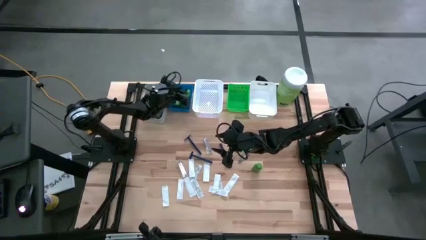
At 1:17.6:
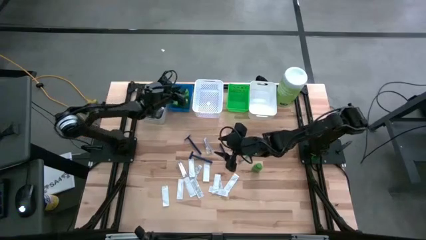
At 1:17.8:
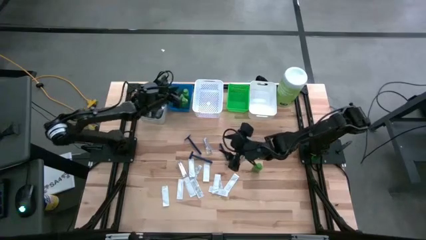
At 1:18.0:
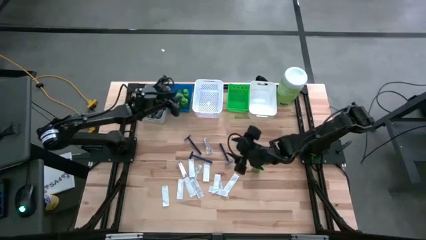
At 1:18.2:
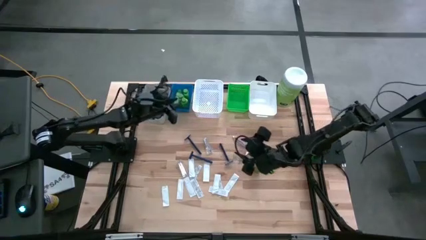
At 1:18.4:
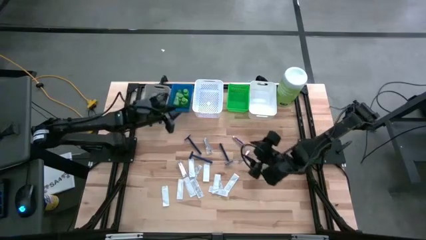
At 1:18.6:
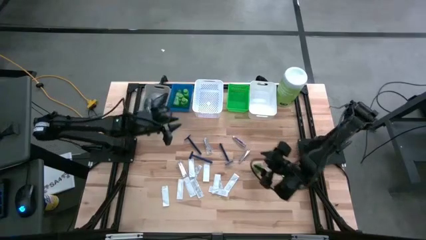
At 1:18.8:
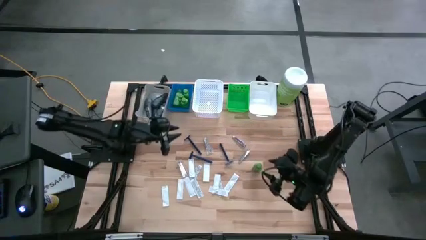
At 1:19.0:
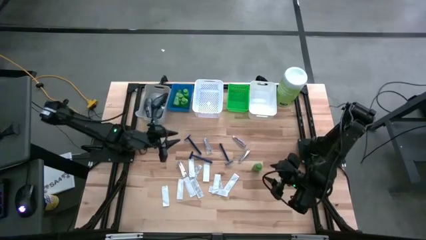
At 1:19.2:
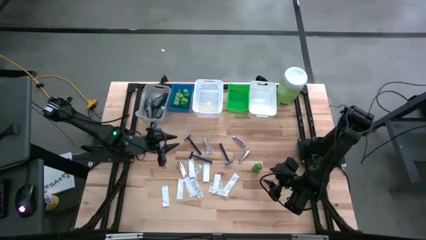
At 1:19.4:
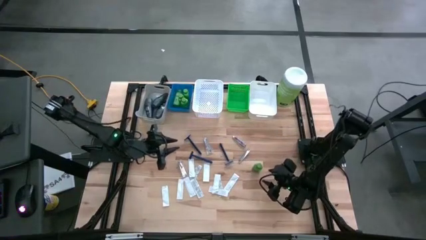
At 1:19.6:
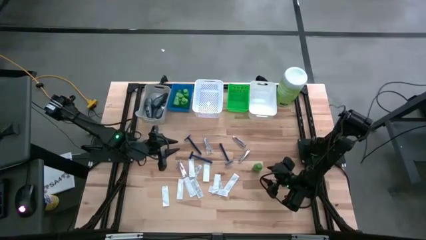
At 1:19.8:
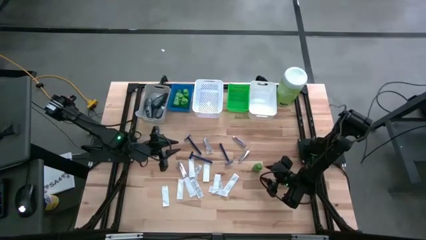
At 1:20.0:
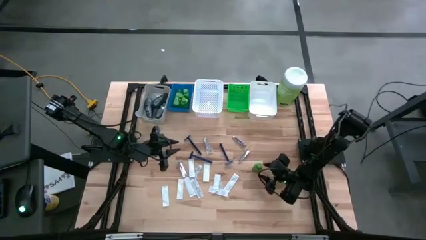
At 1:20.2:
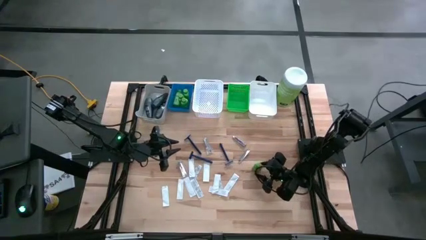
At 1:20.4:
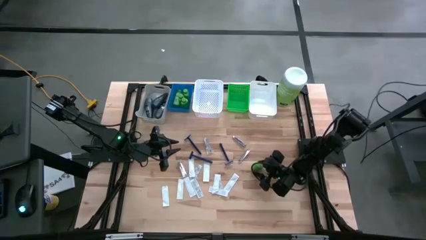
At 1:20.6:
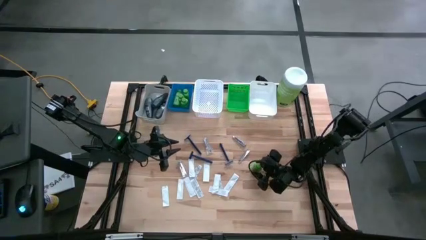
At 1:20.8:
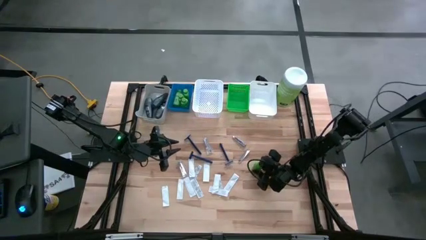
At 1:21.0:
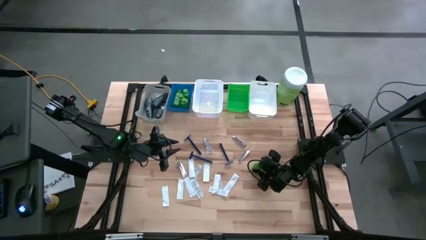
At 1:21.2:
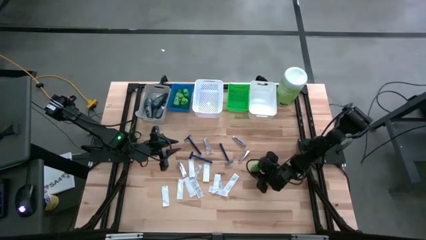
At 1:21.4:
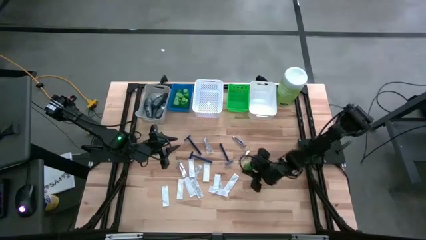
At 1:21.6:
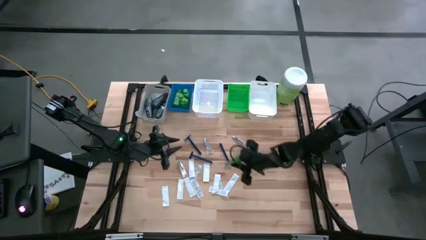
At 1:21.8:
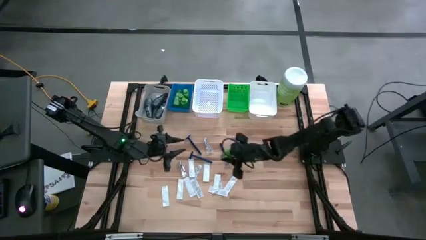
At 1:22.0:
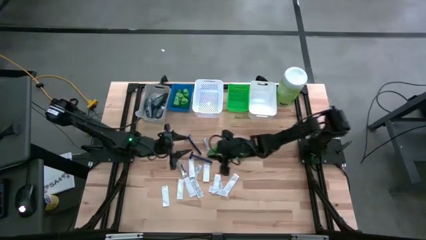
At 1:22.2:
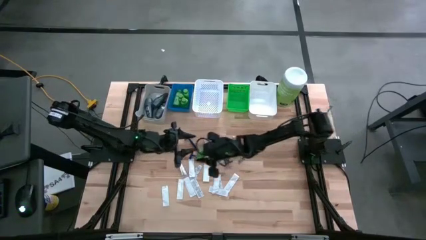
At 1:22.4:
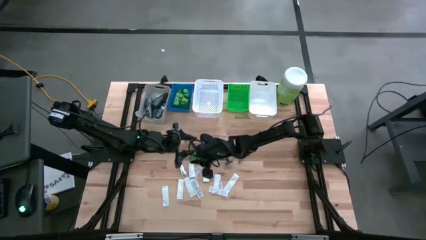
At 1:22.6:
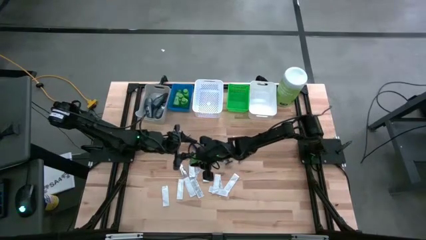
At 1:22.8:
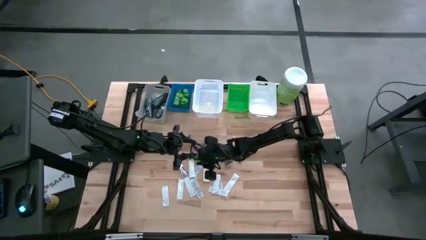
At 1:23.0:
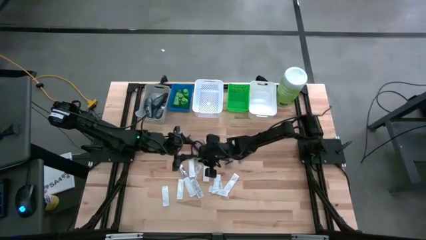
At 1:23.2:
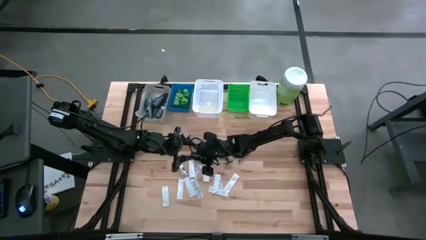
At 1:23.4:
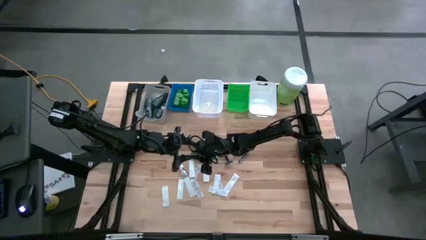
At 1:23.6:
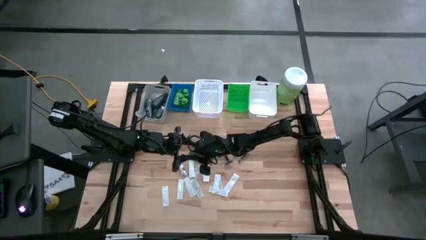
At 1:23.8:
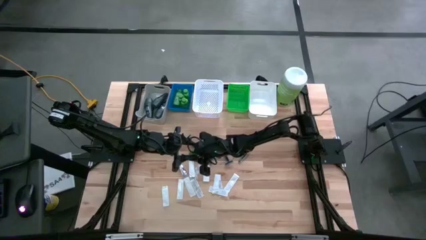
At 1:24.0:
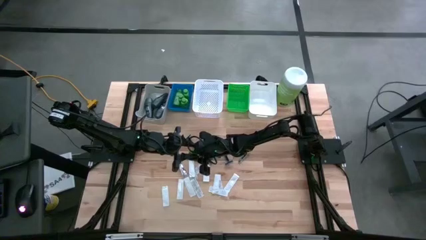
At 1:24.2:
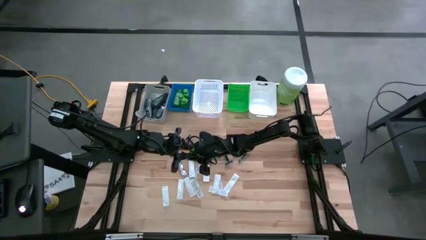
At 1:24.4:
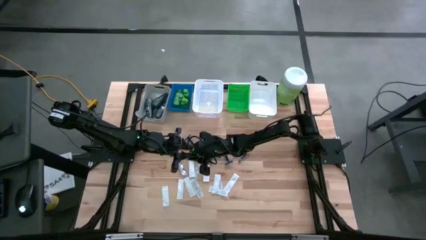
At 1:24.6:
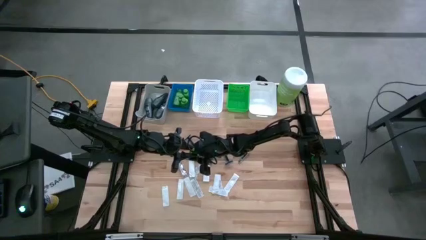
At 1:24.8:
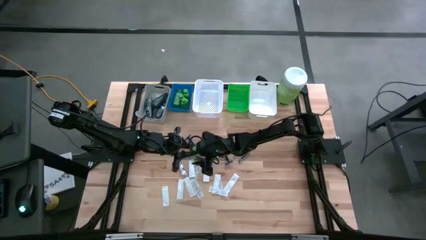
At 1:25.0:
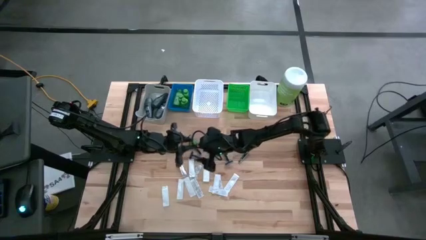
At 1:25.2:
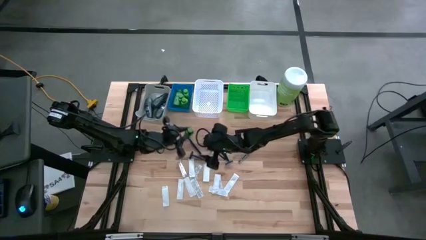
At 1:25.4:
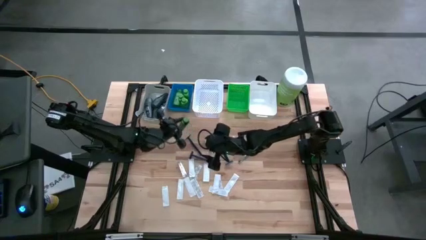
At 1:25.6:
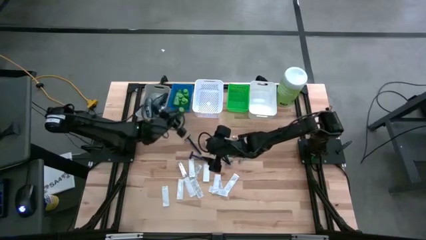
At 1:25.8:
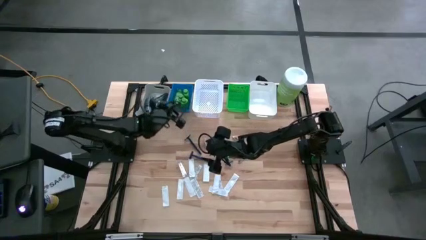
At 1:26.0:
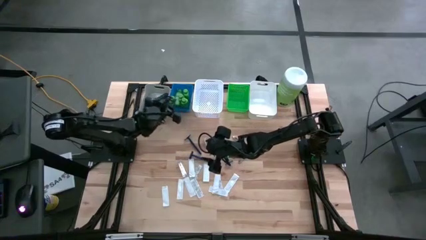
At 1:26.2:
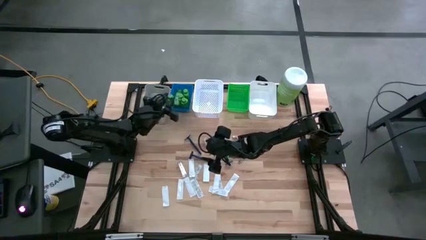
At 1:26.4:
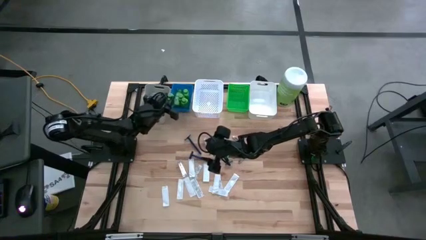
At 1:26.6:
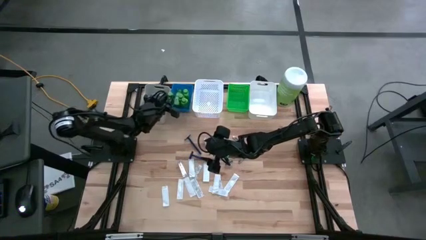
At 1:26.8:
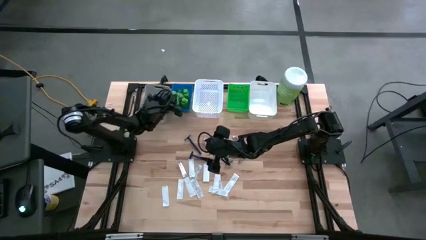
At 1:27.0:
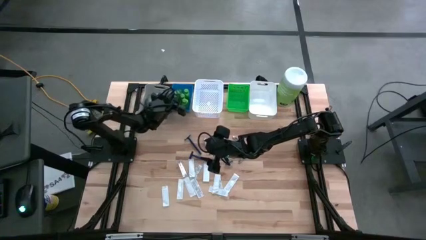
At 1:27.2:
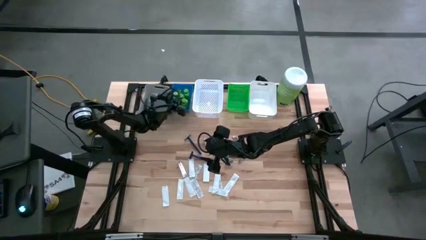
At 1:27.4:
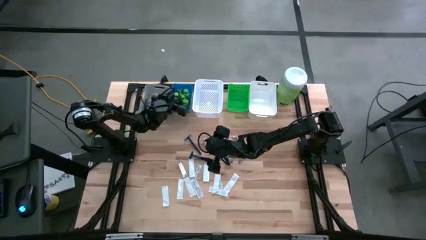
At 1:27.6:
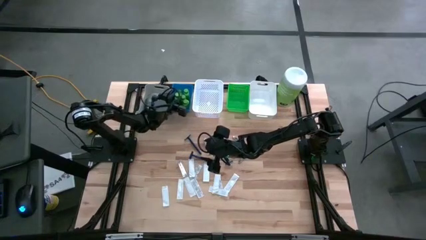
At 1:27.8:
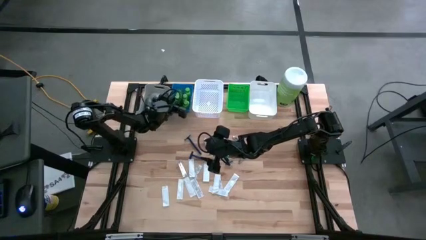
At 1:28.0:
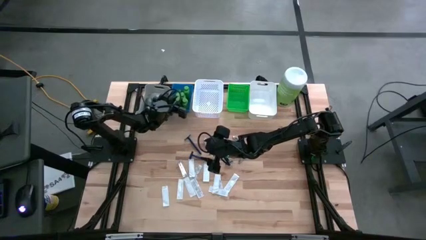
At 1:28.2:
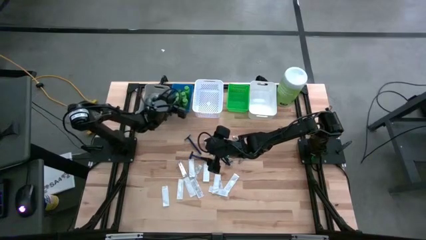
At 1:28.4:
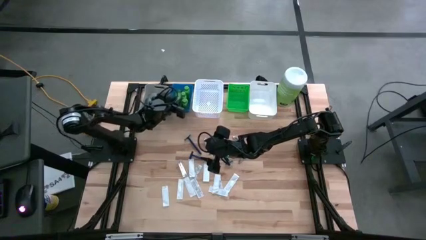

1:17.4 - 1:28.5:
Task: Pick & Place Travel size toiletries
Put the shampoo into the blue bin
